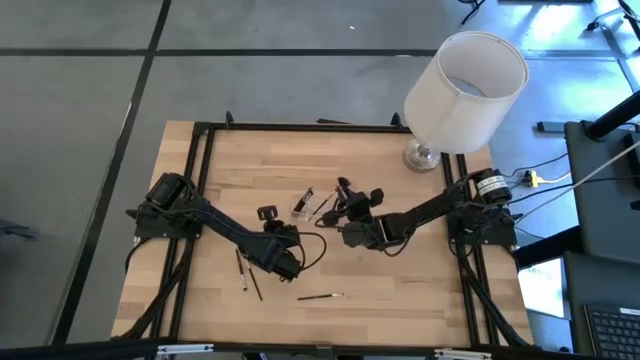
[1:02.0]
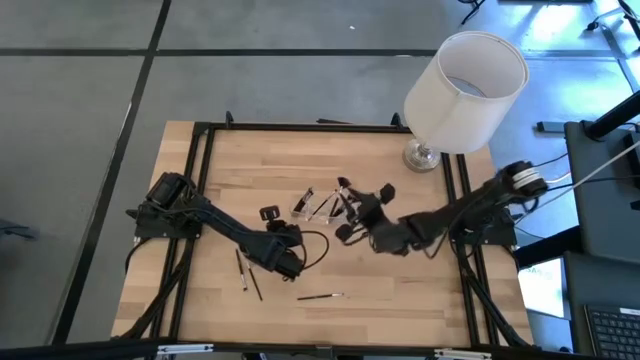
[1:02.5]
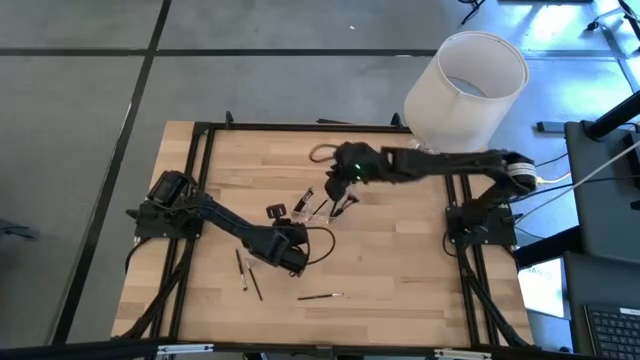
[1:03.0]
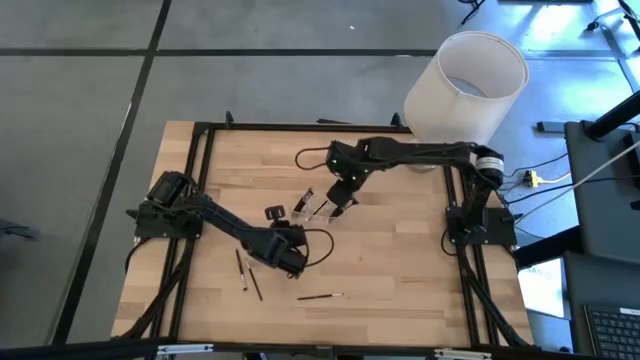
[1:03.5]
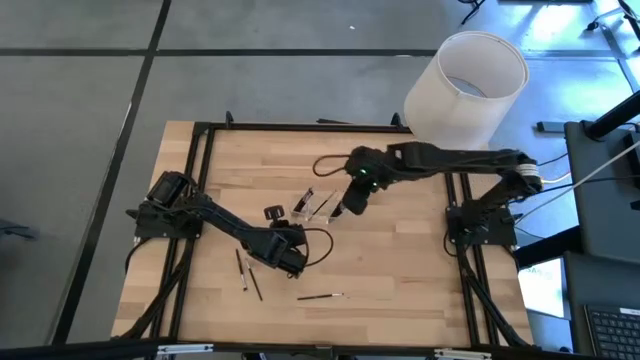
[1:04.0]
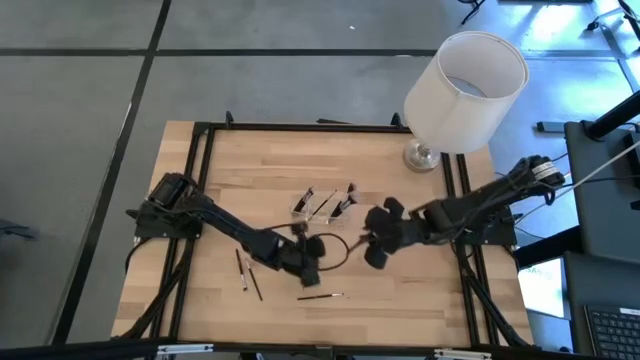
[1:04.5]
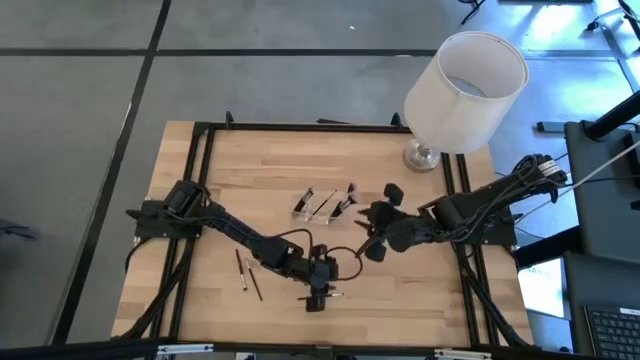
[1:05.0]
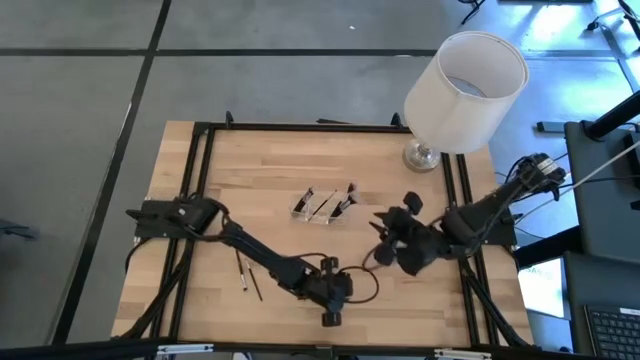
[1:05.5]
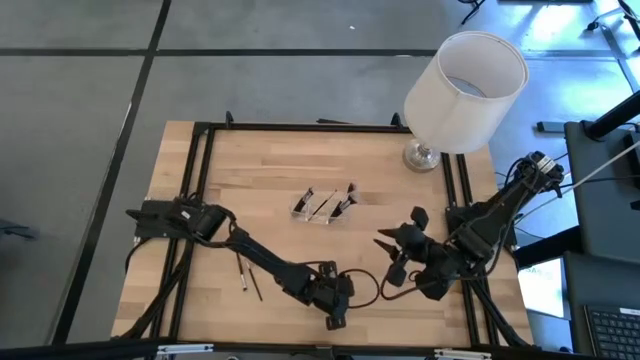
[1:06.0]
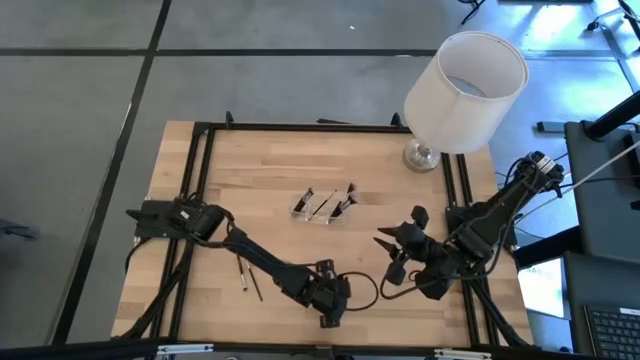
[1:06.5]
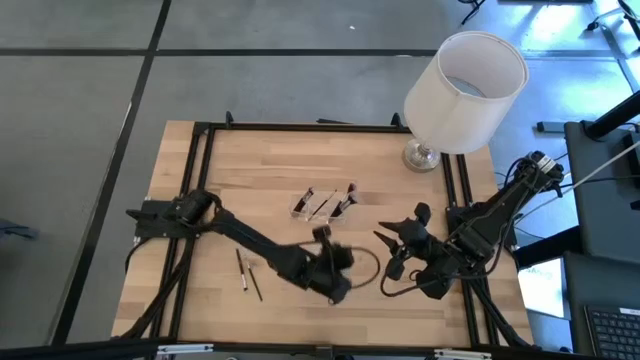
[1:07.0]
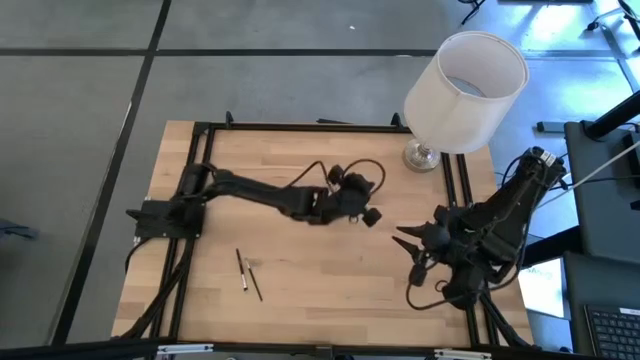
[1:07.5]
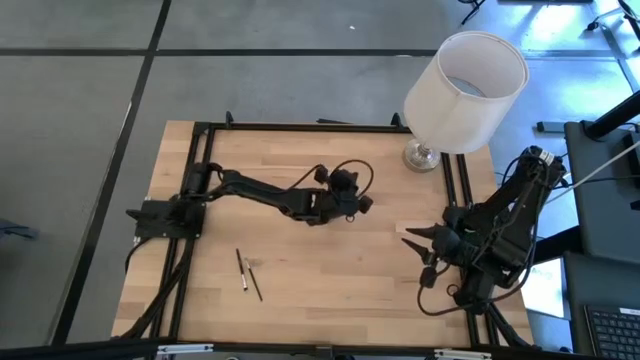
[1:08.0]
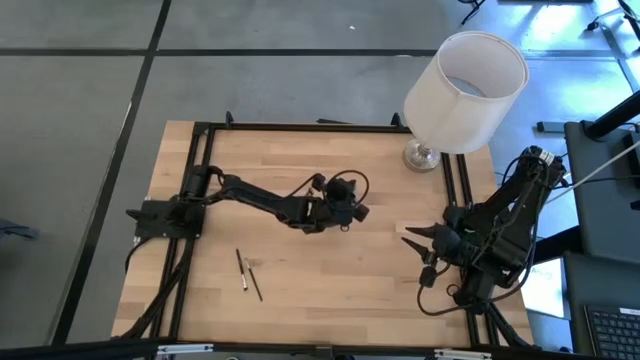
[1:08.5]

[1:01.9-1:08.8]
Task: Put items in baskets/containers
Put the liner brush into the transparent organizer

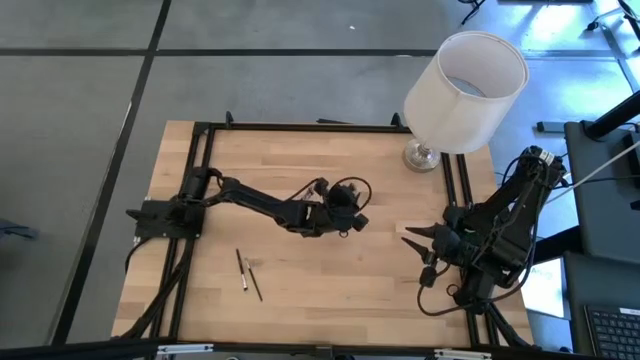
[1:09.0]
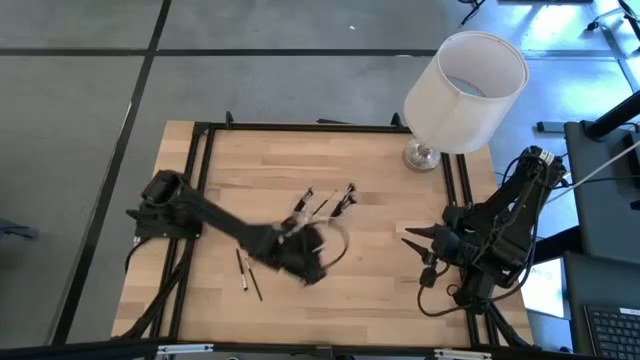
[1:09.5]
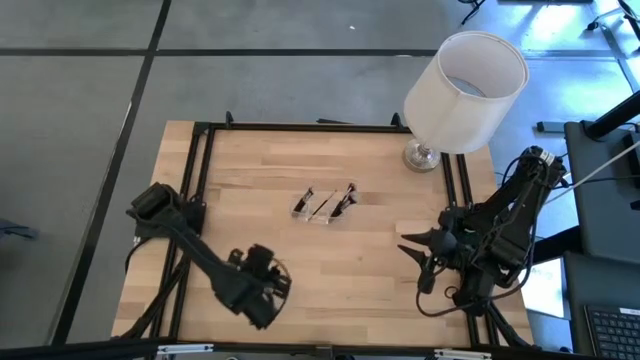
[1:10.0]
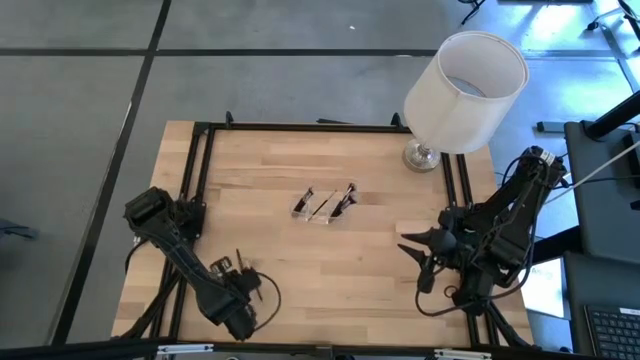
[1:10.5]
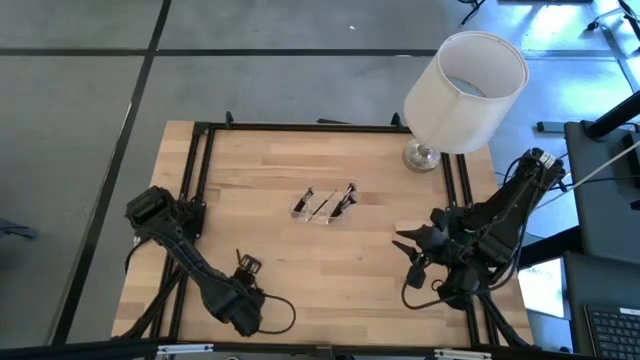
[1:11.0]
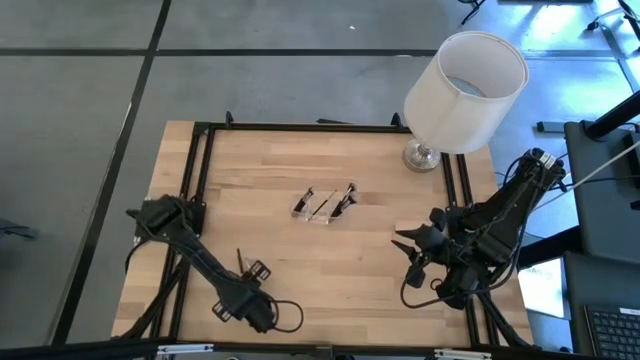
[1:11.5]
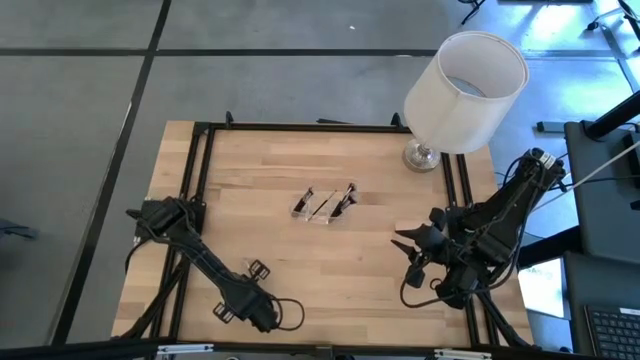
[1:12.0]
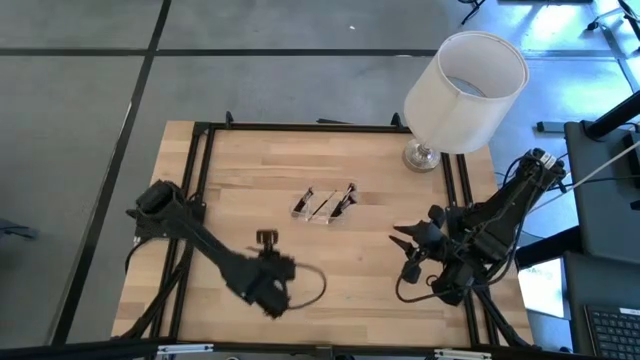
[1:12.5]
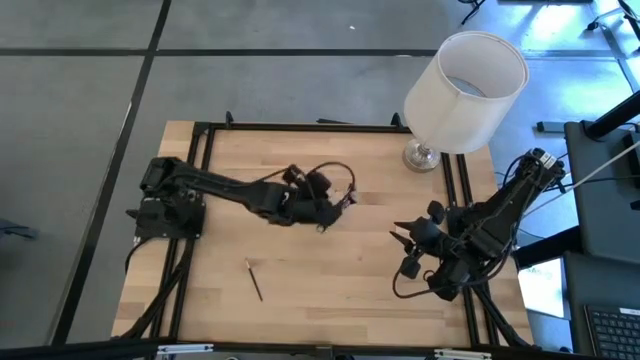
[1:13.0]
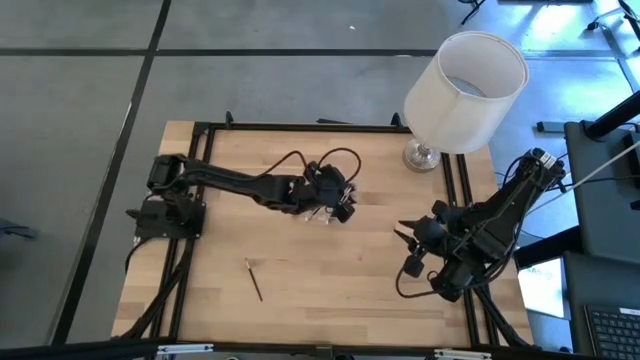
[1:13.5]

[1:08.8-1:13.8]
Put the foundation brush into the transparent organizer

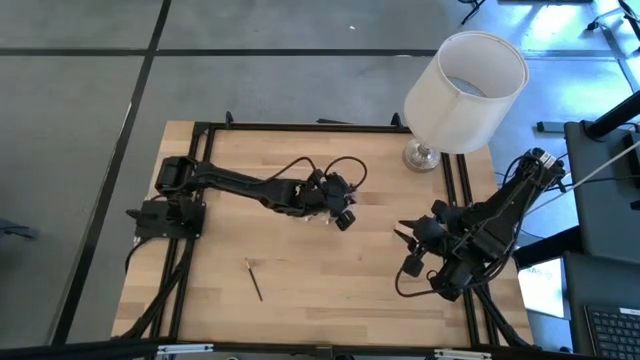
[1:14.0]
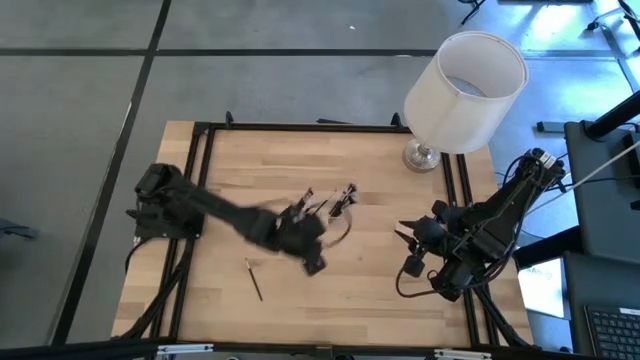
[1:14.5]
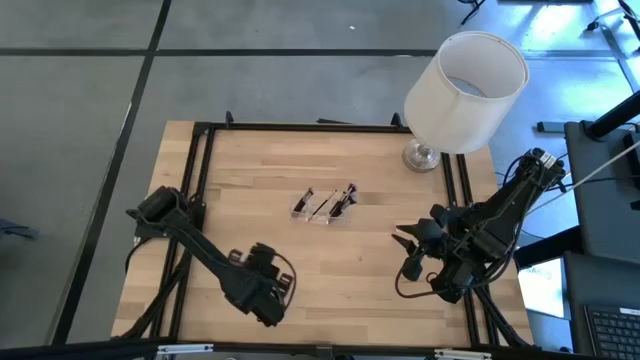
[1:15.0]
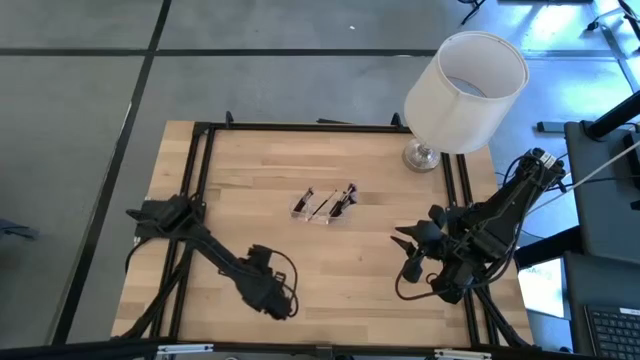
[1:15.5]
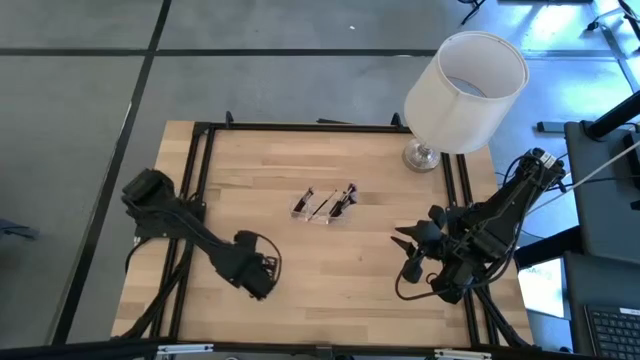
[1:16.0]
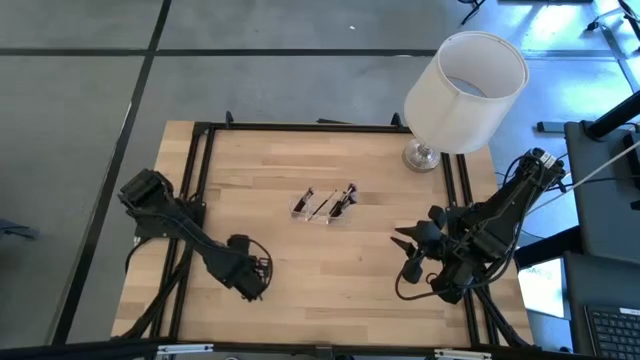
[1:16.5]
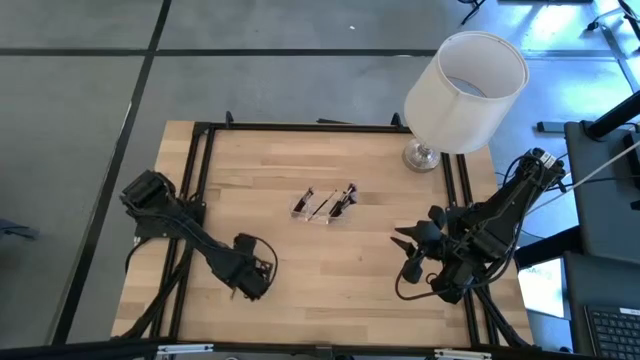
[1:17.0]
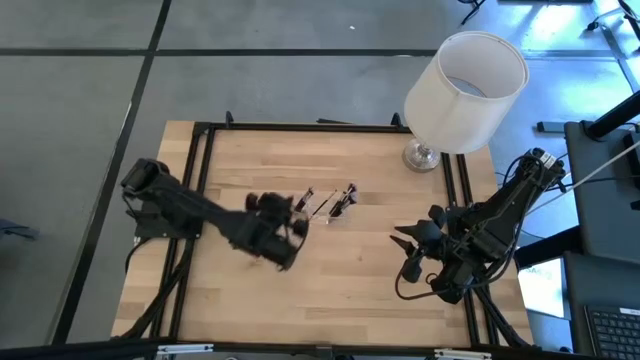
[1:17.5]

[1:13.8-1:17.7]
Put the eyeshadow brush into the transparent organizer

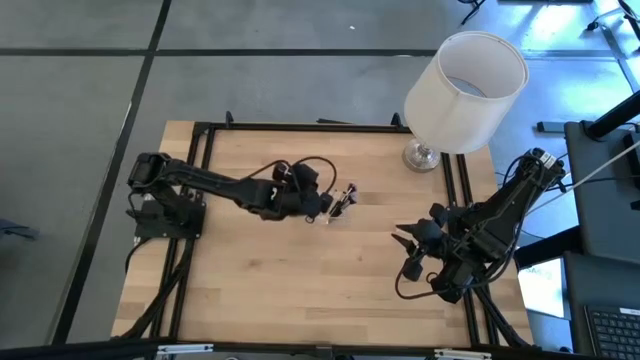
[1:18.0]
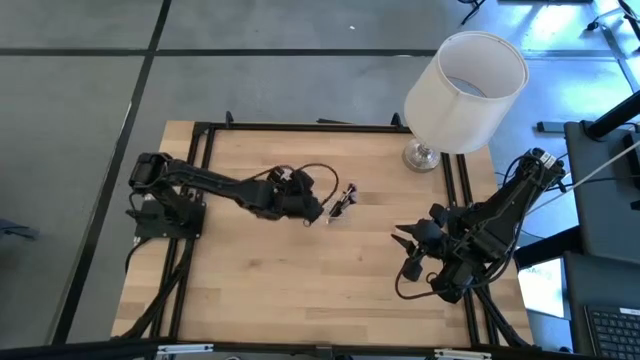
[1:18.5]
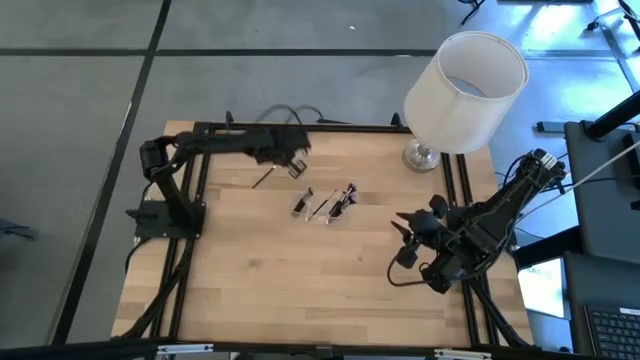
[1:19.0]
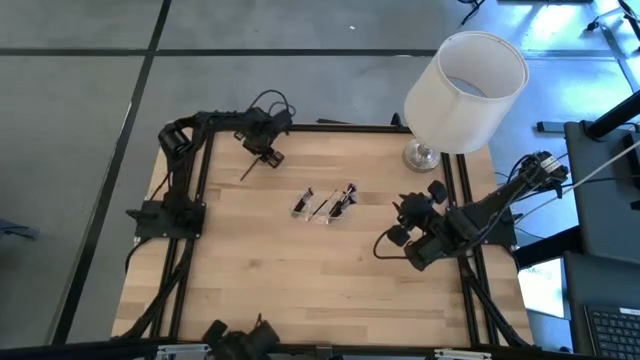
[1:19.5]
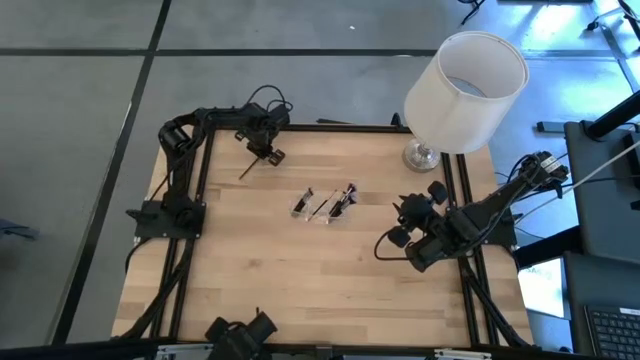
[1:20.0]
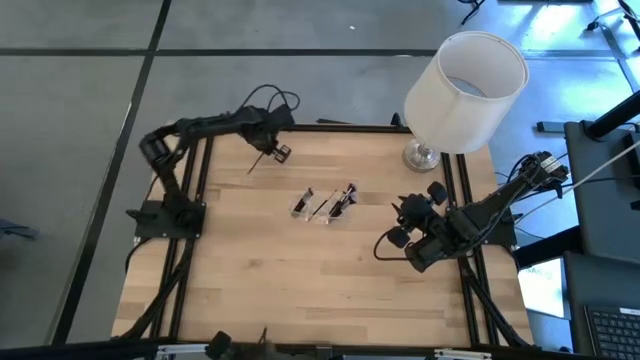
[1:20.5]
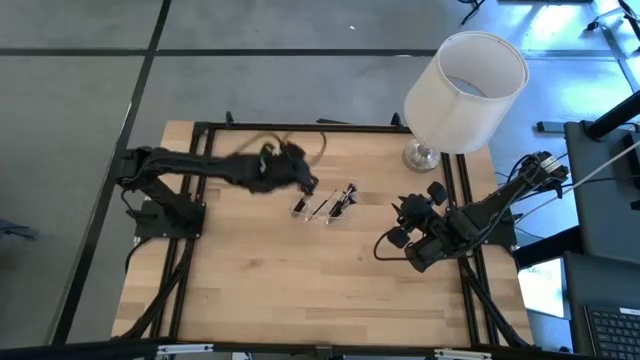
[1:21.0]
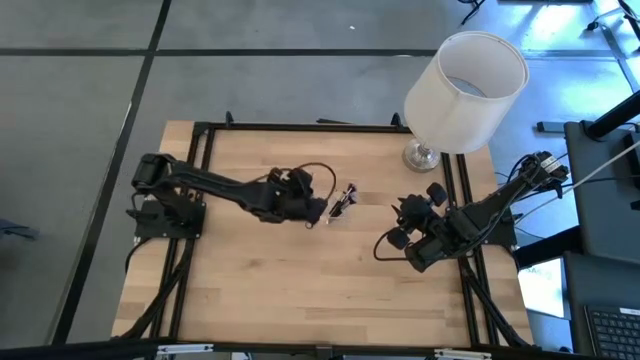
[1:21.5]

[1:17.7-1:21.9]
Put the eyeshadow brush into the transparent organizer
